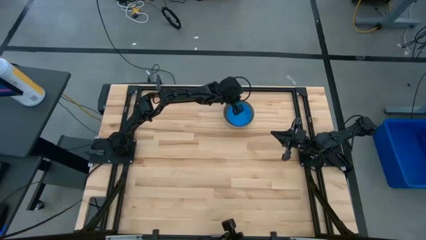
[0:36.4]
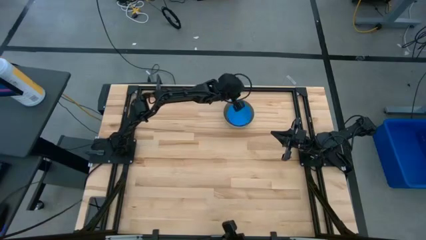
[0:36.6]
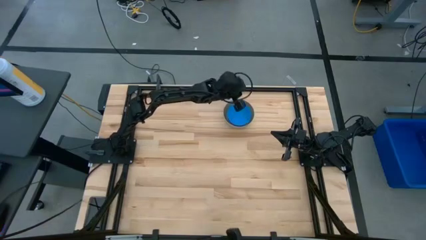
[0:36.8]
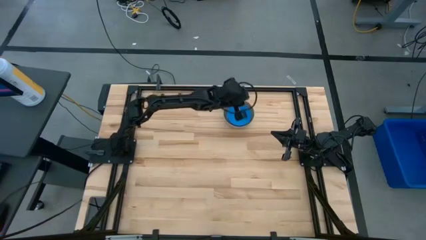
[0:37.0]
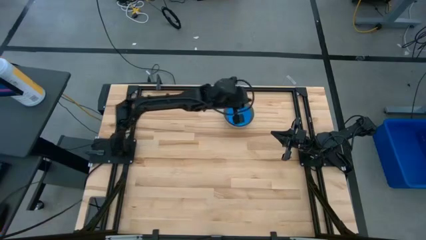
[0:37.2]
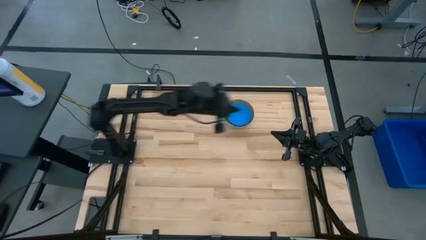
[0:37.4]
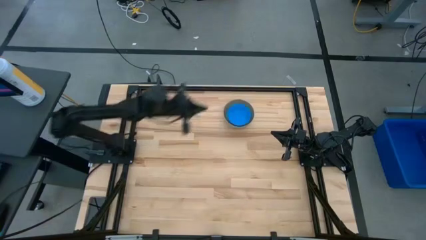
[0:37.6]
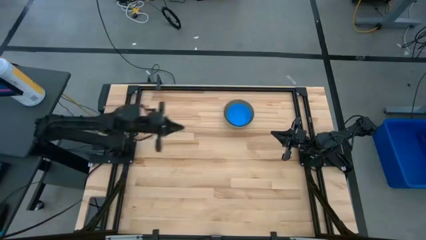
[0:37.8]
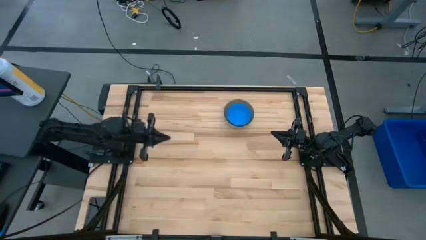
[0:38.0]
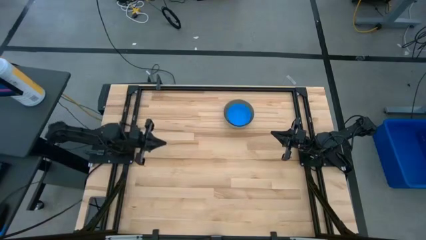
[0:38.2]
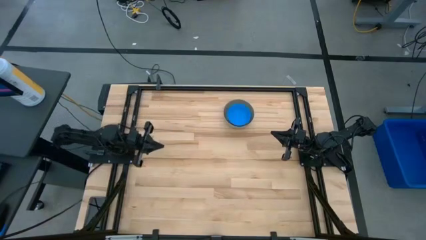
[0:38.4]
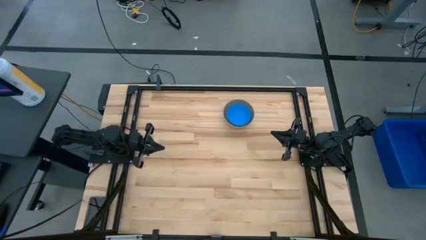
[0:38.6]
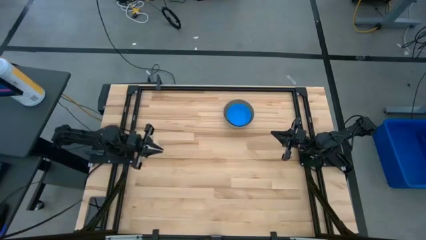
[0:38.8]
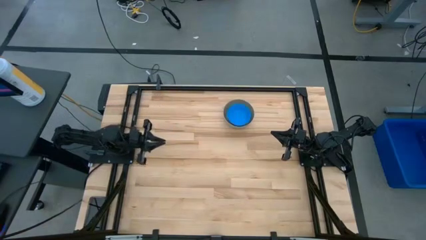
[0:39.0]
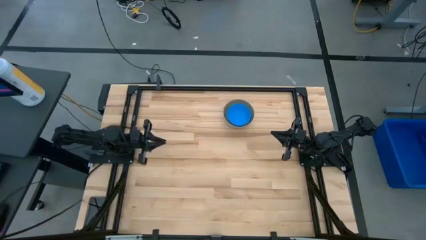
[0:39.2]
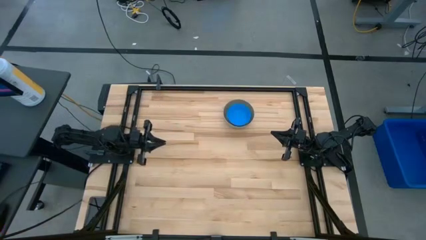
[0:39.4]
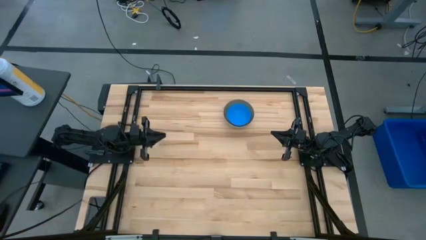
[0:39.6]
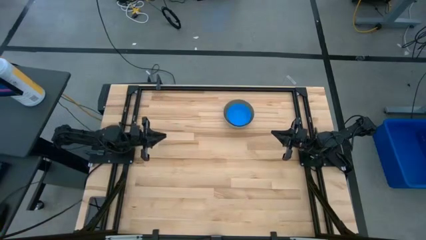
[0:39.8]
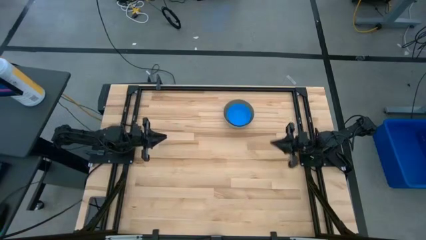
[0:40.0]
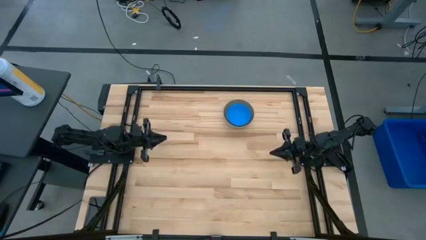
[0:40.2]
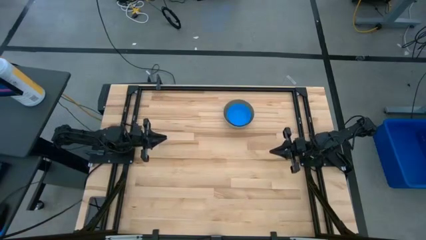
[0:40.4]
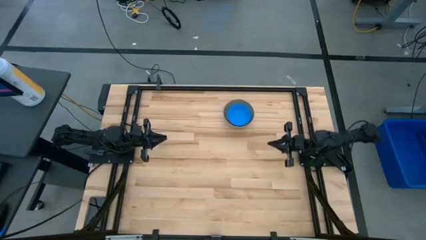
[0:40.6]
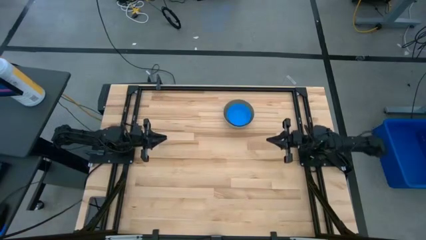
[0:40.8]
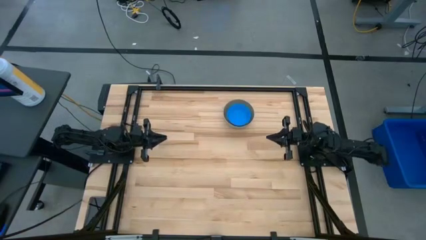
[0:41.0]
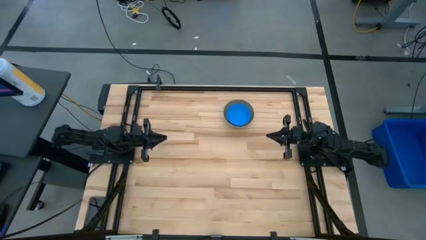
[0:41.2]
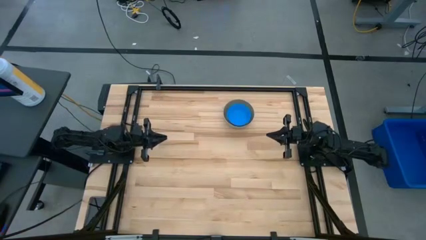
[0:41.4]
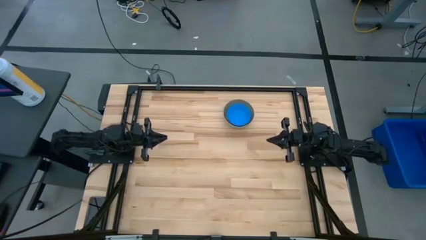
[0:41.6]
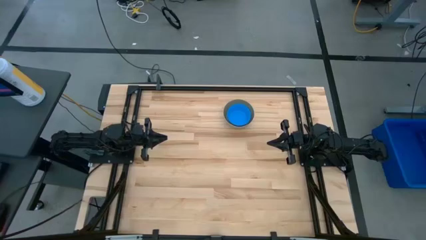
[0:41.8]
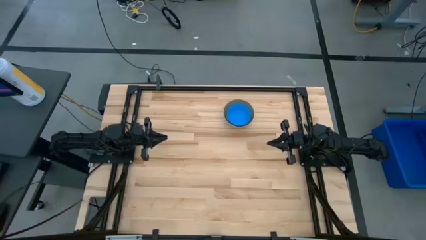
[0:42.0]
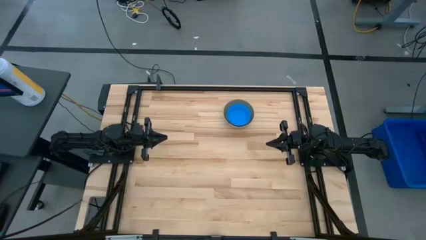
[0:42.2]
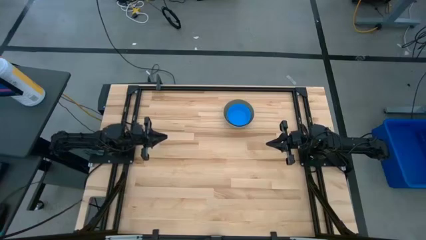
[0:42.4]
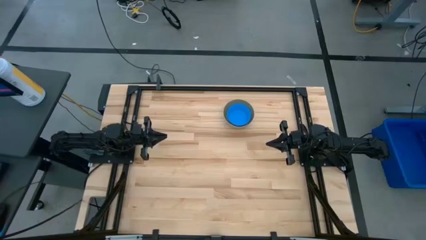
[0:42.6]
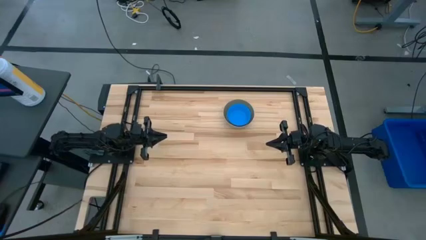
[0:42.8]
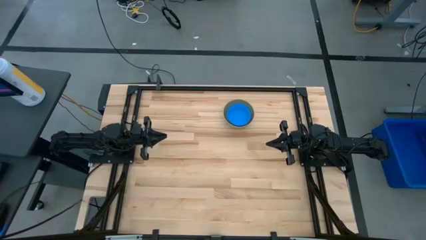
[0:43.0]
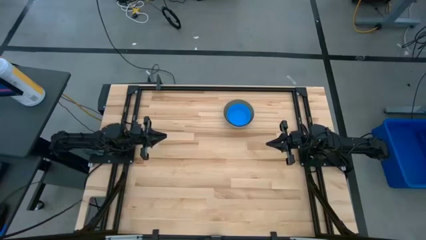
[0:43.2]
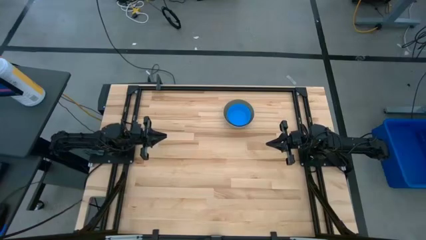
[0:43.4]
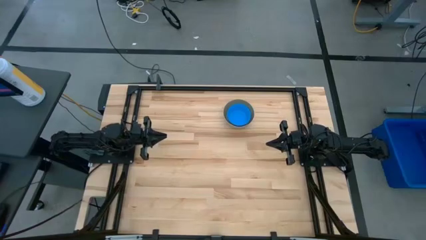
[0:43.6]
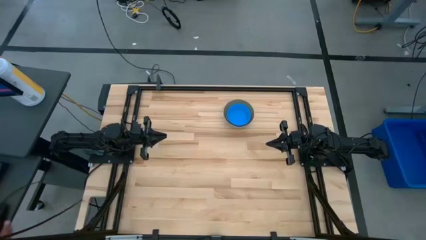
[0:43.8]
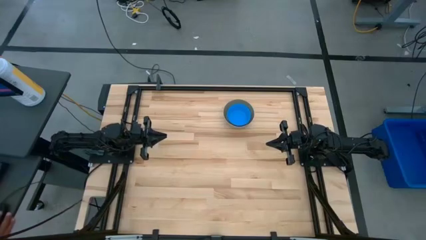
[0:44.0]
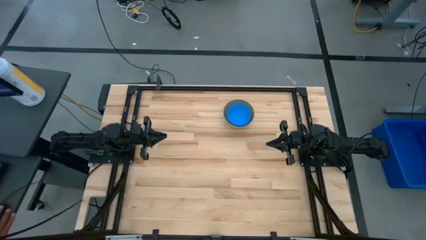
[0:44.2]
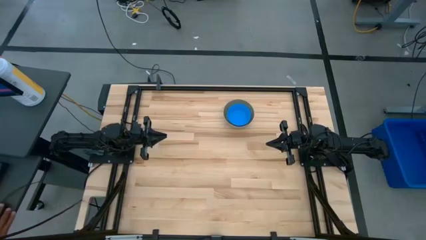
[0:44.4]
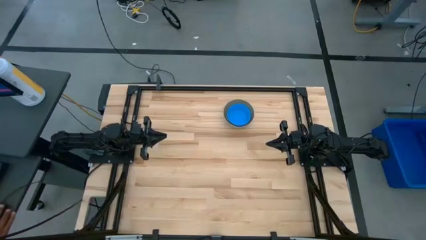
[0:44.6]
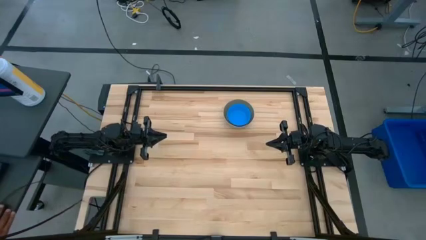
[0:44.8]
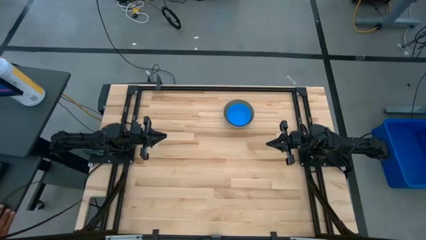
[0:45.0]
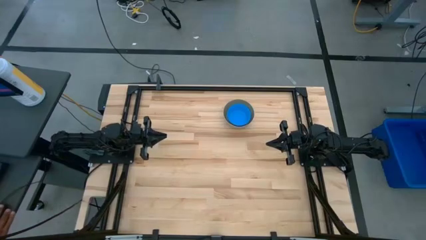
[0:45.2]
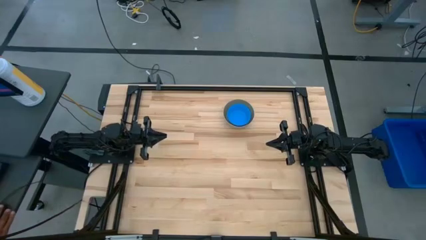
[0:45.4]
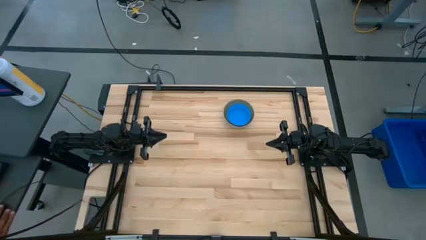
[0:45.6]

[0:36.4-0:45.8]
Return to Home Position

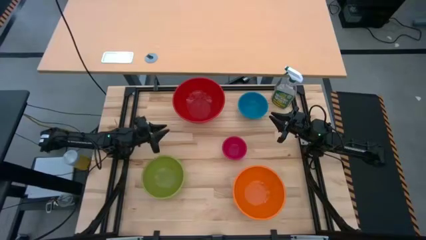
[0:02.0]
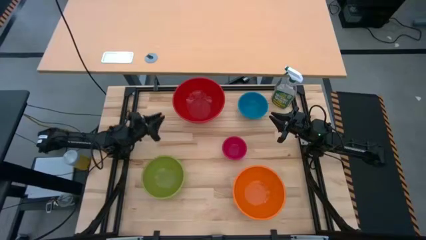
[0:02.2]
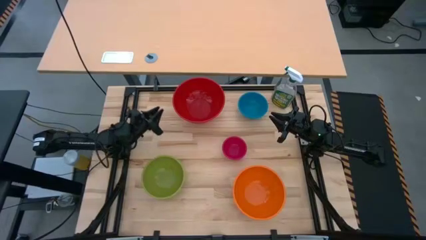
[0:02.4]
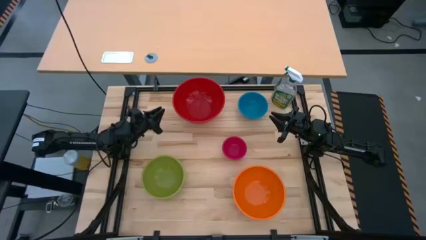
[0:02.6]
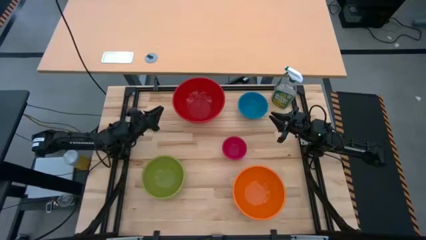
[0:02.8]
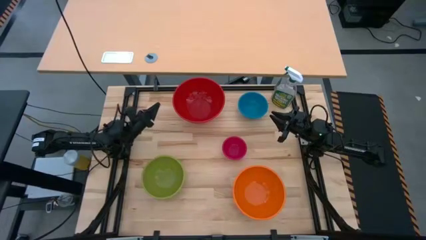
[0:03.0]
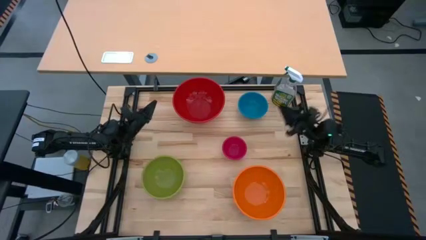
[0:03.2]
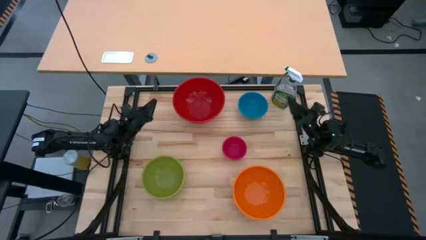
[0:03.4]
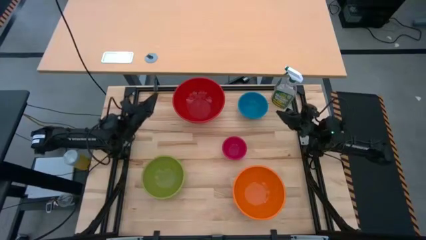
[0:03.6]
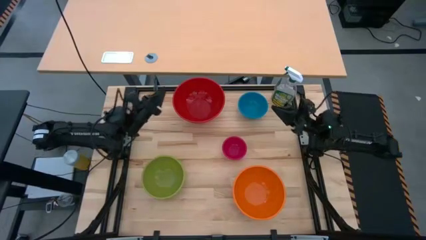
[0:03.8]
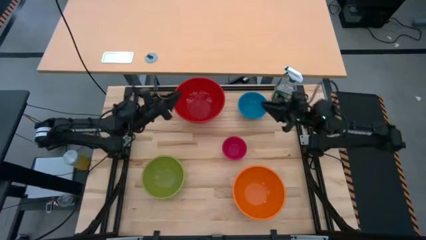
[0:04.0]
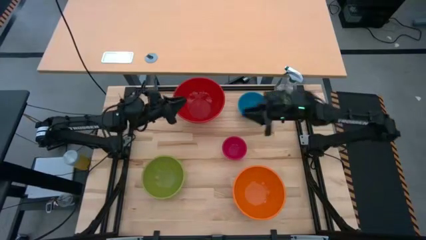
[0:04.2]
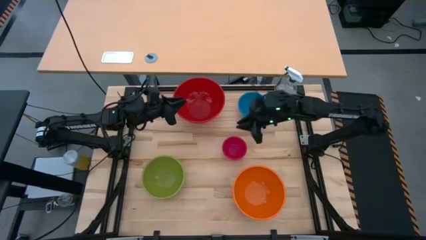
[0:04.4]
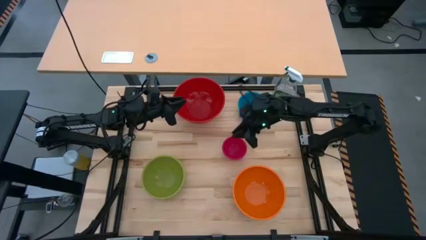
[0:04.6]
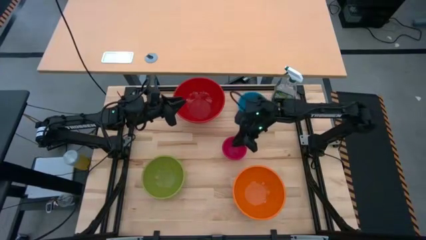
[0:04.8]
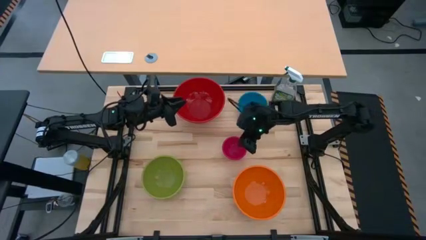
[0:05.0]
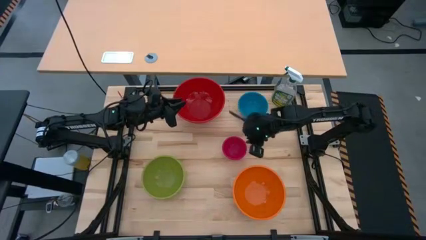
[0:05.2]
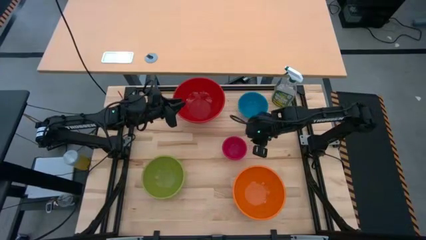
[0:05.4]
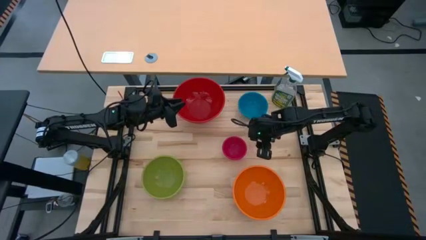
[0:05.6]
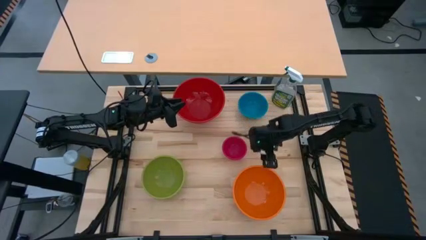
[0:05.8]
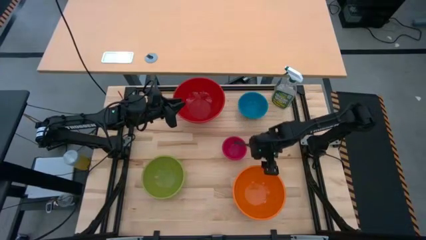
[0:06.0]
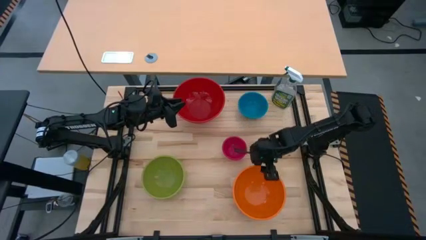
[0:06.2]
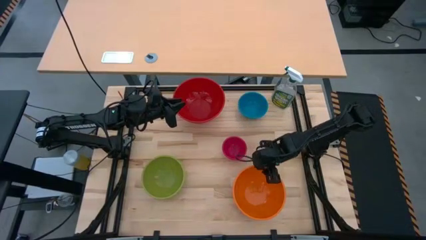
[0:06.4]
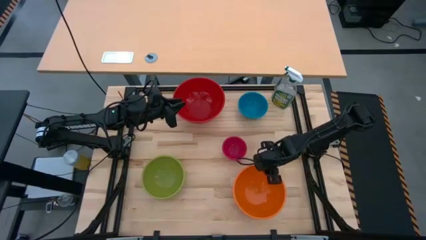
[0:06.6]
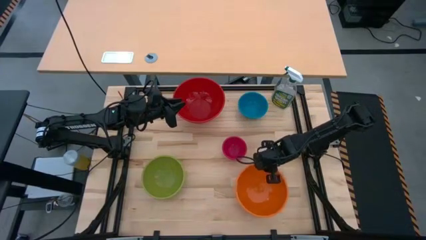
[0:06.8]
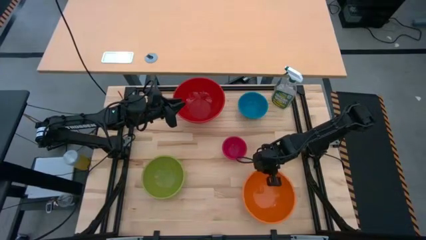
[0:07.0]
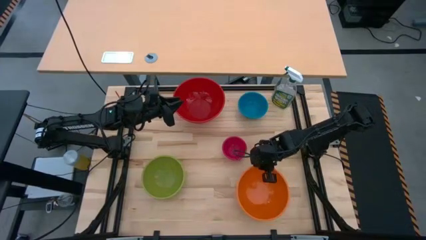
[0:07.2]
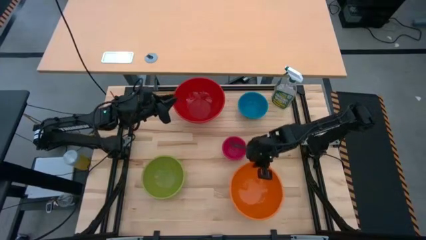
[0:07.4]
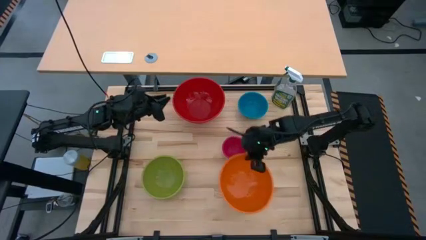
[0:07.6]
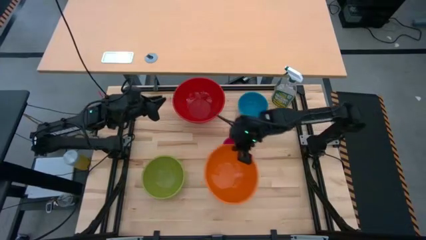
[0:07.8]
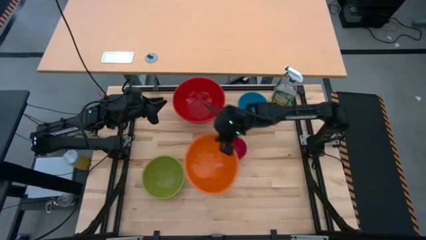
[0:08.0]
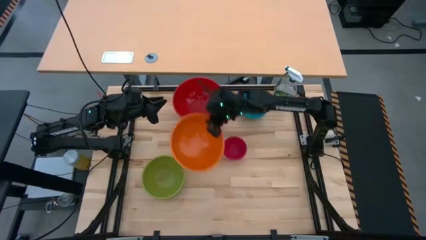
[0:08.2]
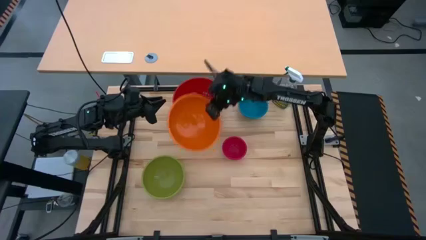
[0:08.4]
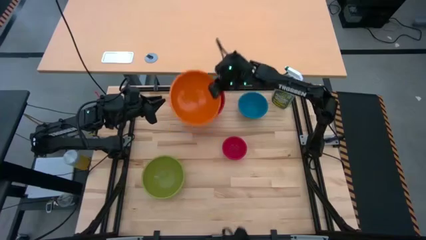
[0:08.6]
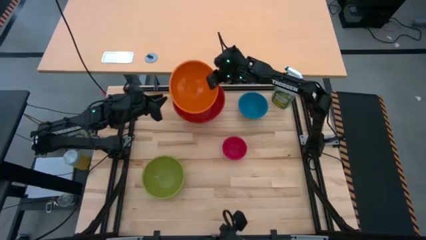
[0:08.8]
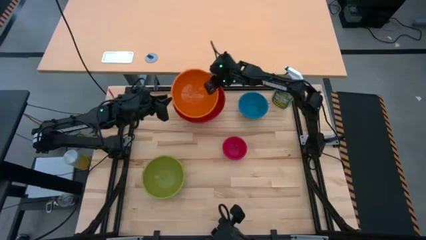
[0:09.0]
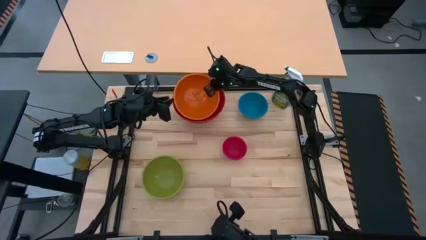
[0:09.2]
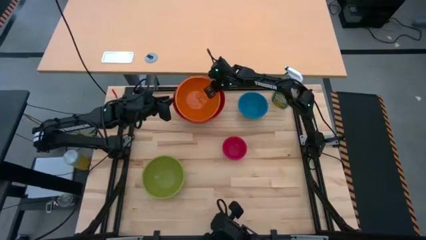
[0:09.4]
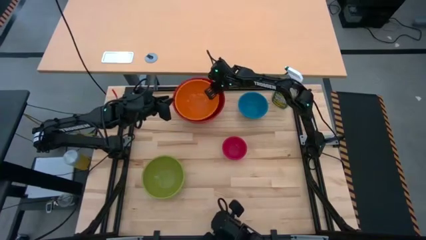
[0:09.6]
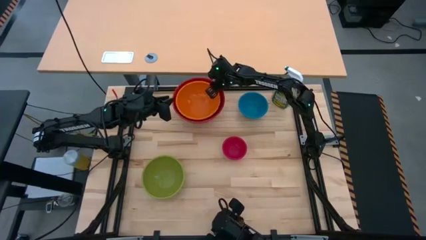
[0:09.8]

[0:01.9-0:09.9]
Stack the orange bowl on the red bowl
